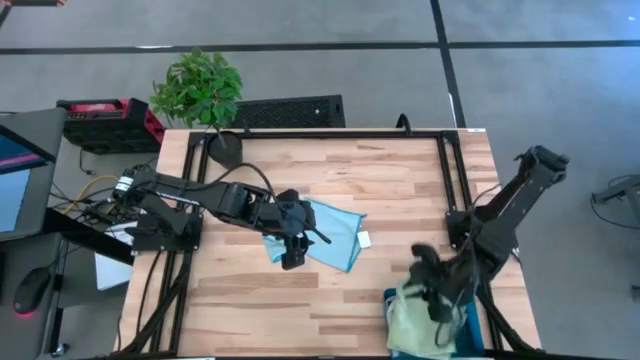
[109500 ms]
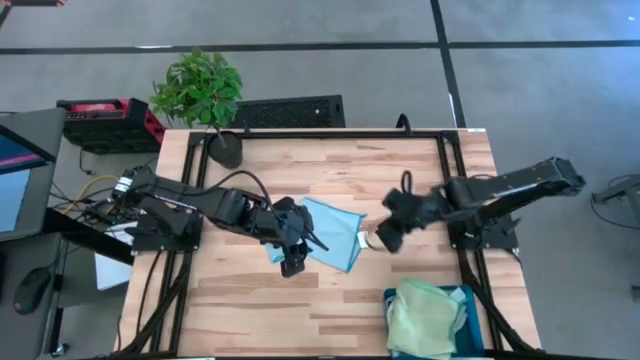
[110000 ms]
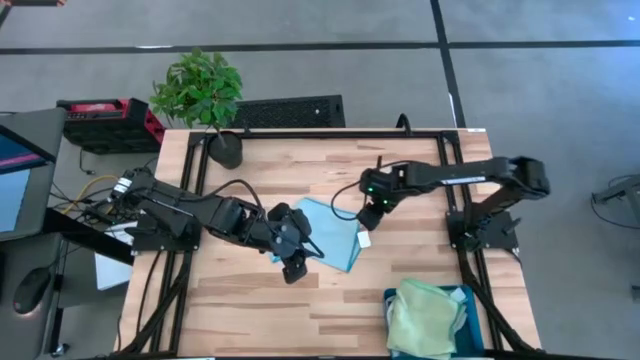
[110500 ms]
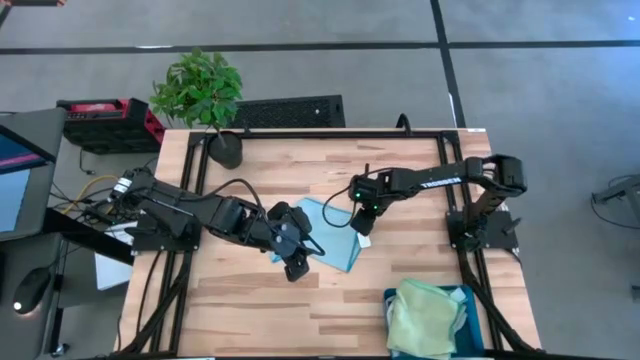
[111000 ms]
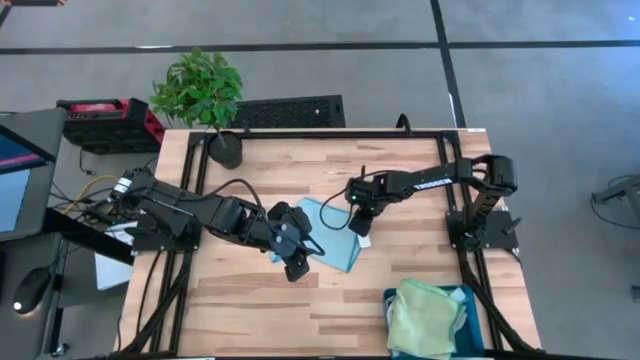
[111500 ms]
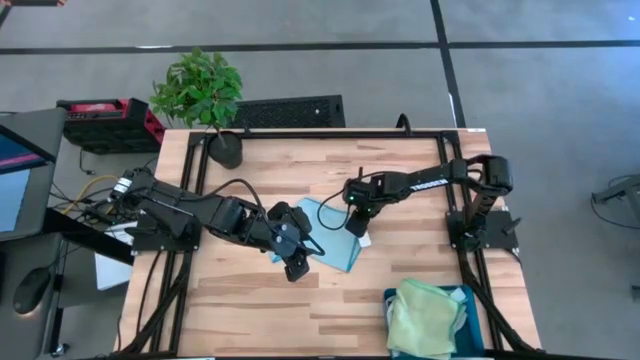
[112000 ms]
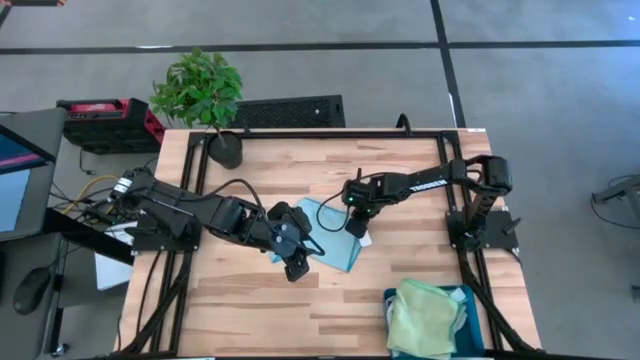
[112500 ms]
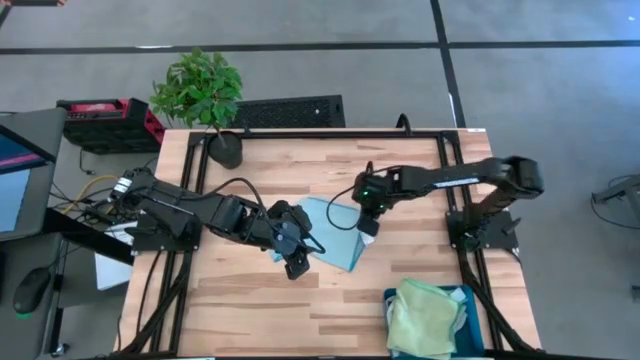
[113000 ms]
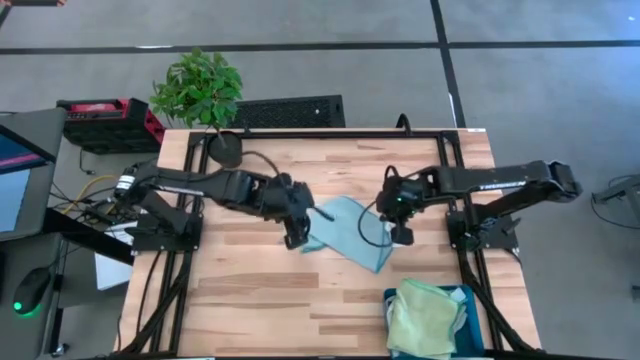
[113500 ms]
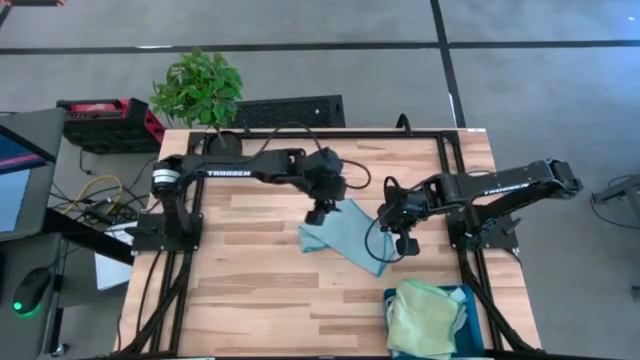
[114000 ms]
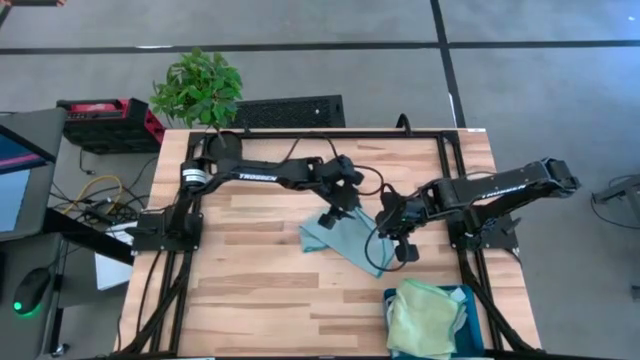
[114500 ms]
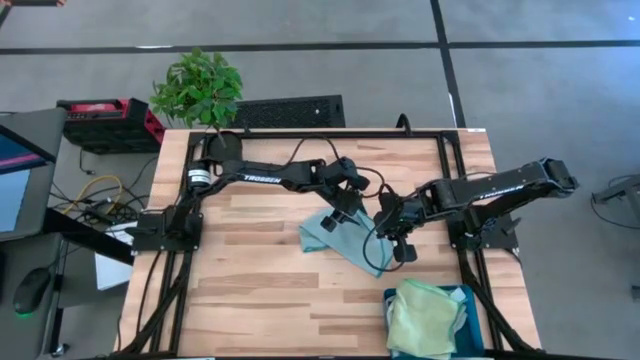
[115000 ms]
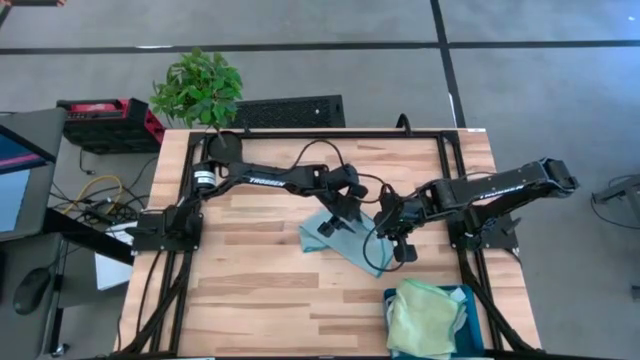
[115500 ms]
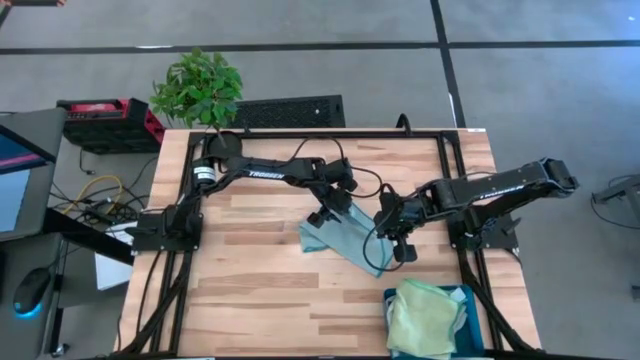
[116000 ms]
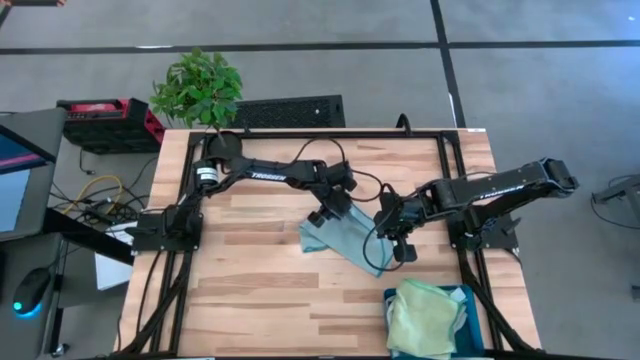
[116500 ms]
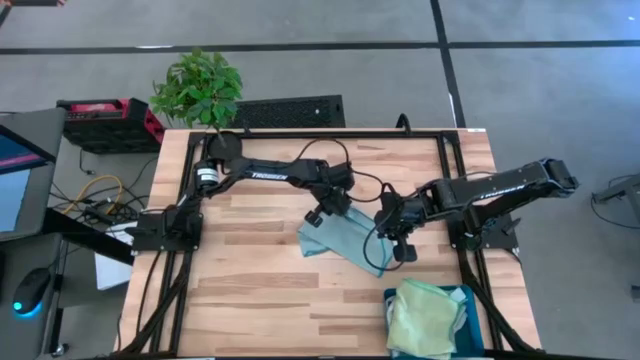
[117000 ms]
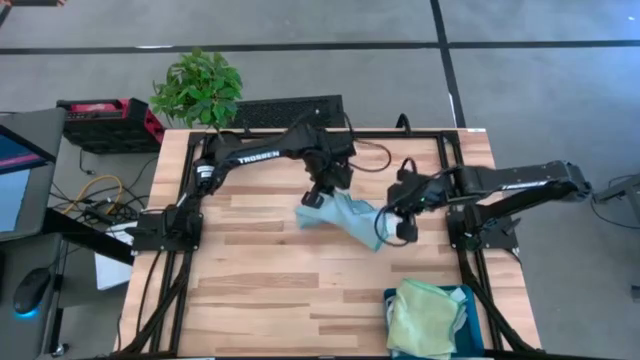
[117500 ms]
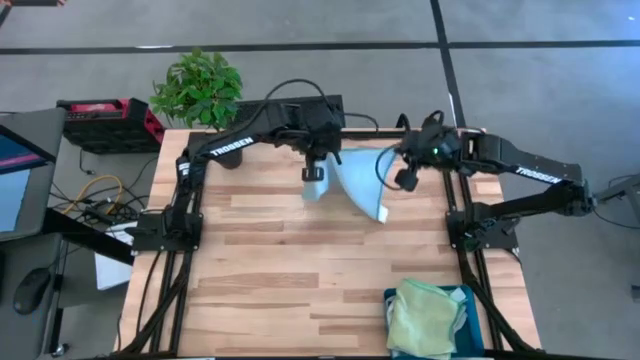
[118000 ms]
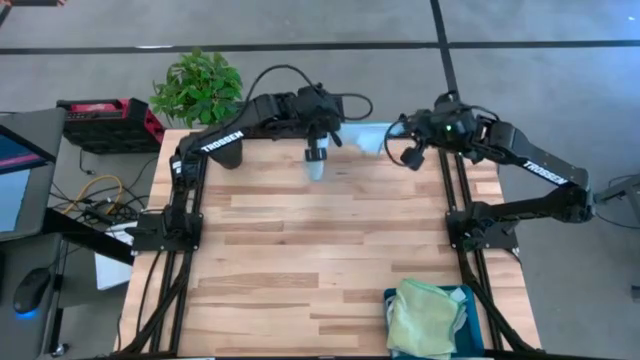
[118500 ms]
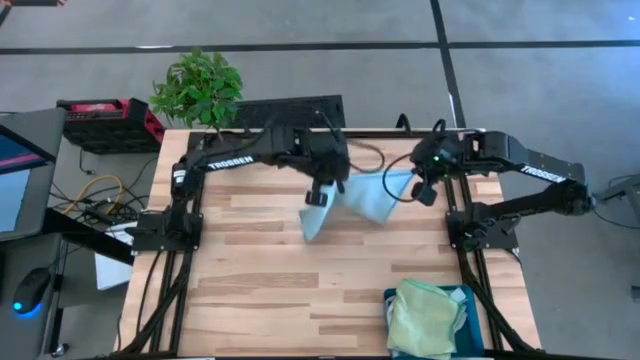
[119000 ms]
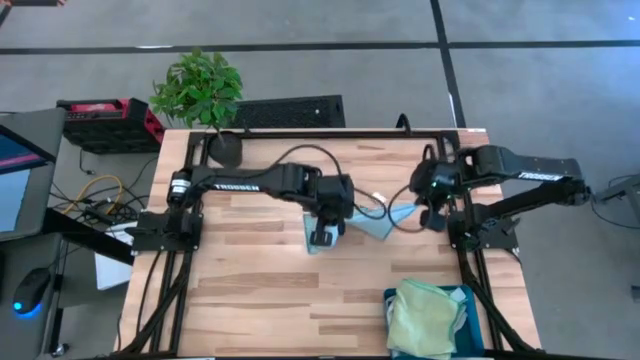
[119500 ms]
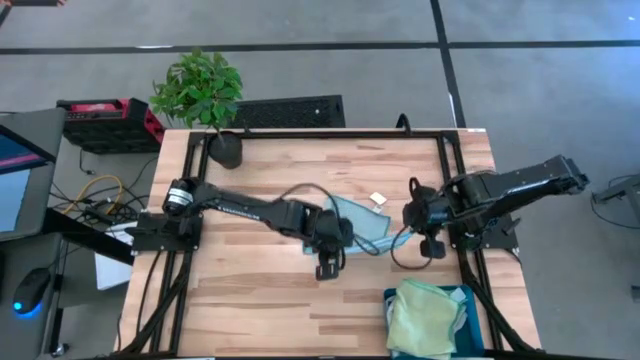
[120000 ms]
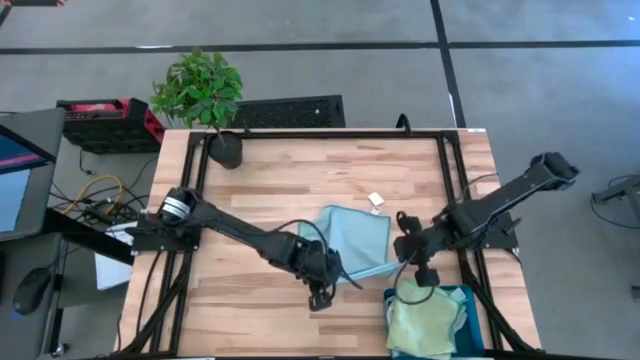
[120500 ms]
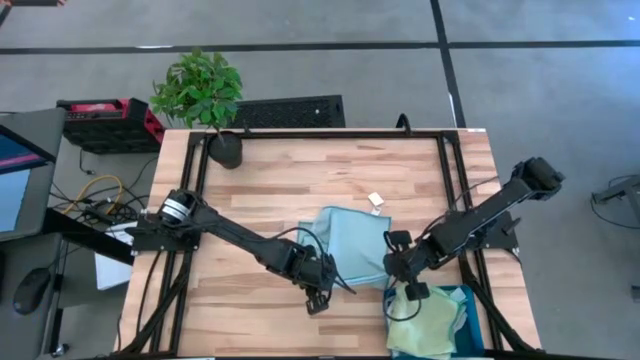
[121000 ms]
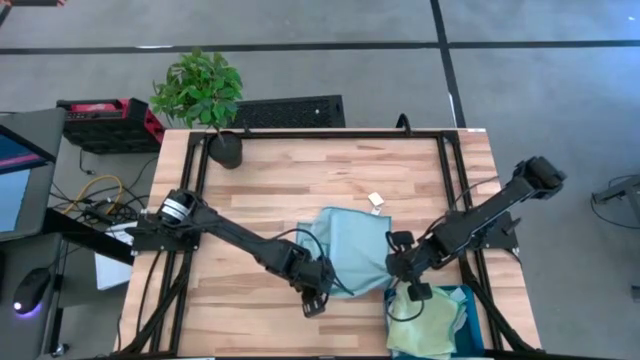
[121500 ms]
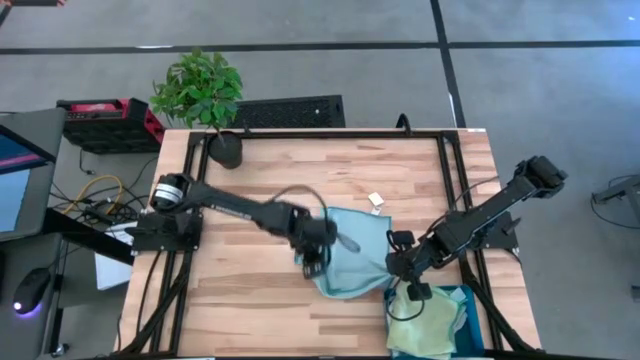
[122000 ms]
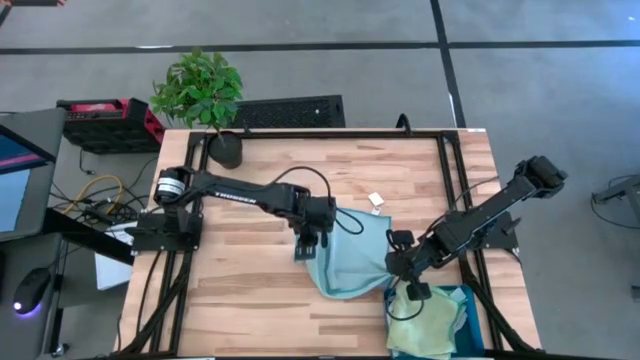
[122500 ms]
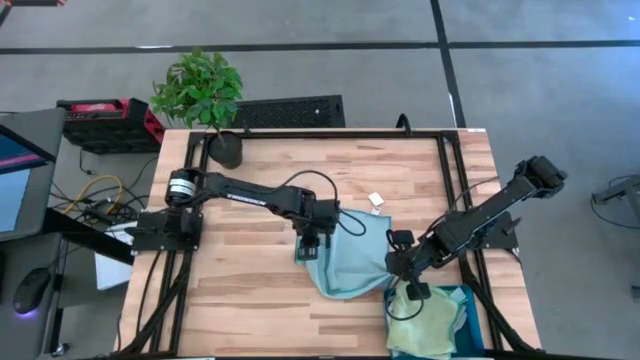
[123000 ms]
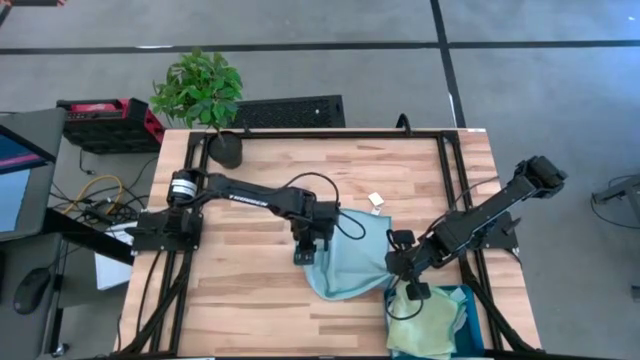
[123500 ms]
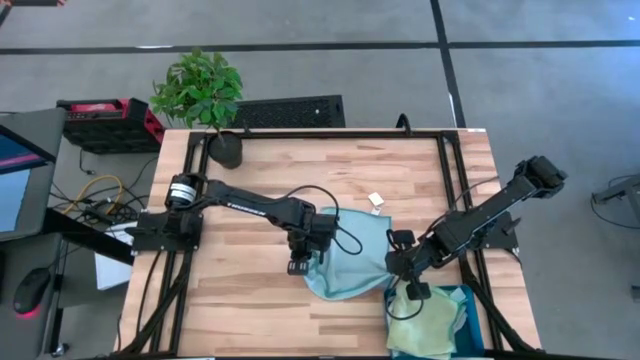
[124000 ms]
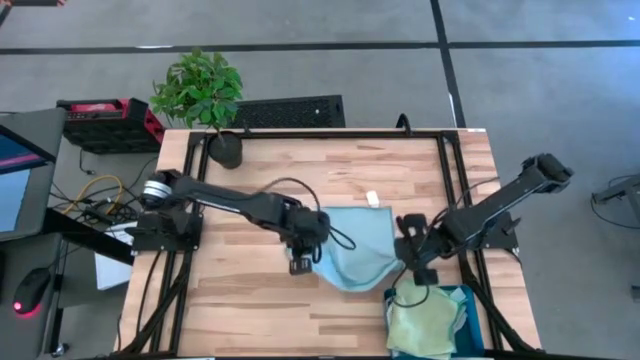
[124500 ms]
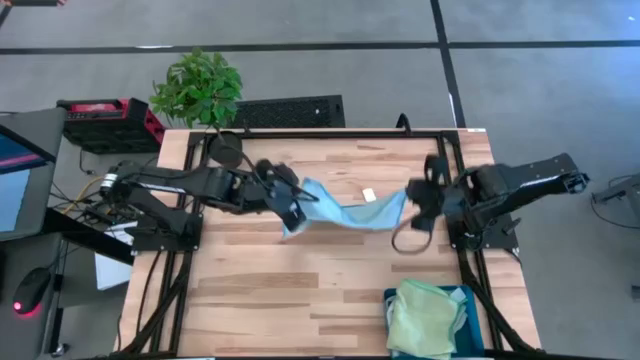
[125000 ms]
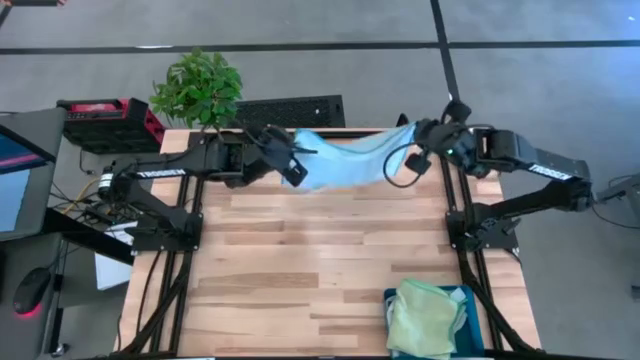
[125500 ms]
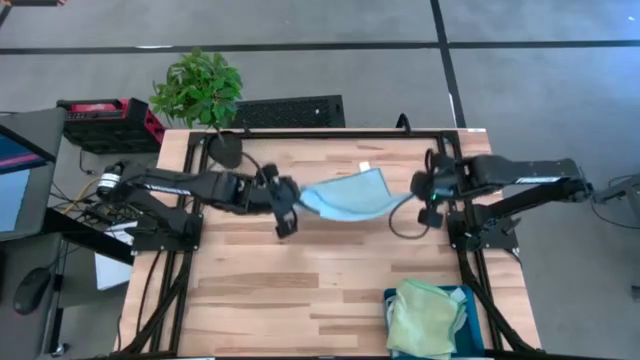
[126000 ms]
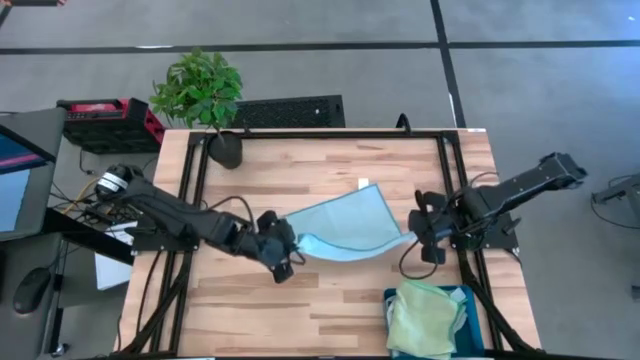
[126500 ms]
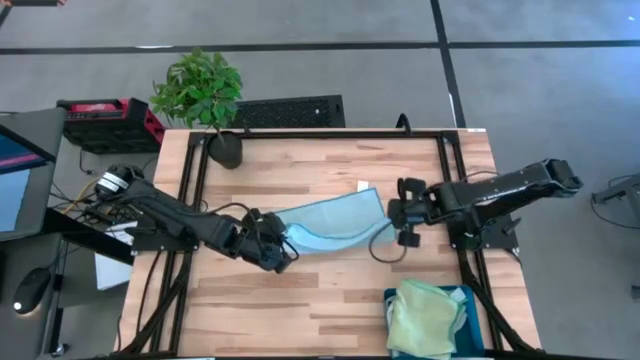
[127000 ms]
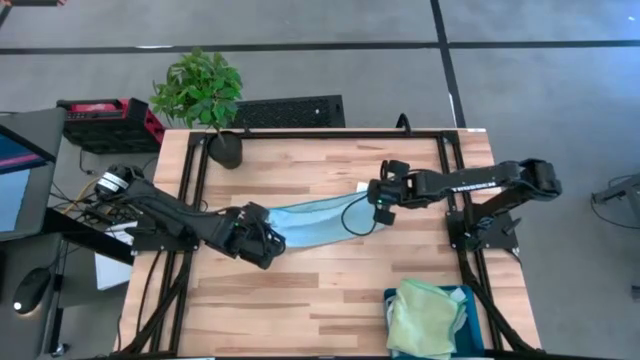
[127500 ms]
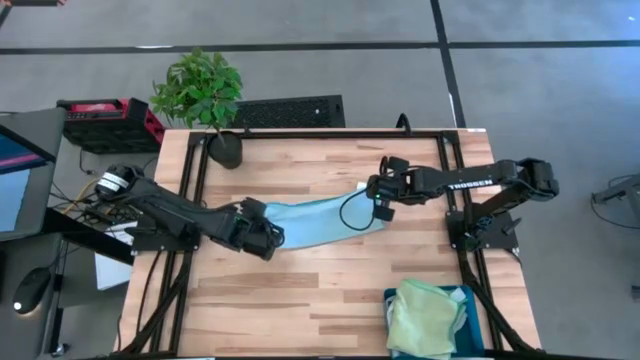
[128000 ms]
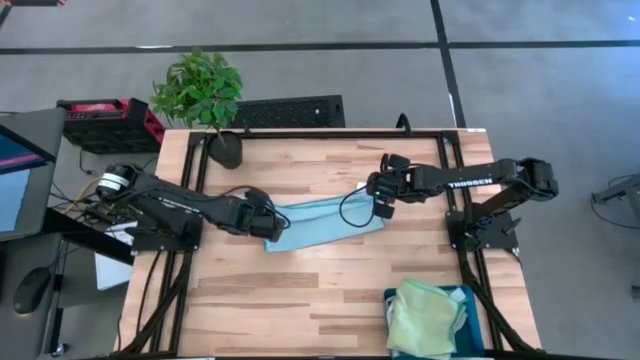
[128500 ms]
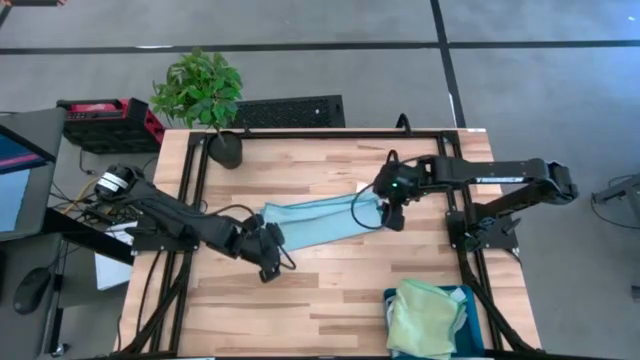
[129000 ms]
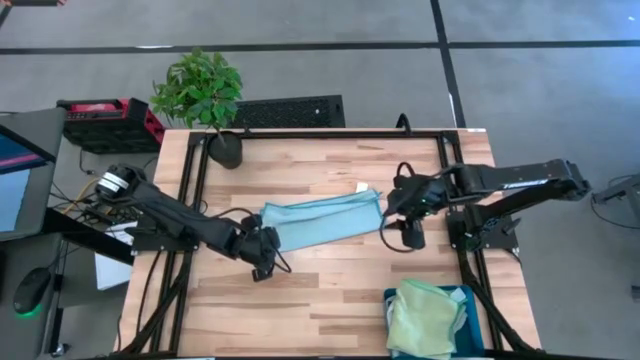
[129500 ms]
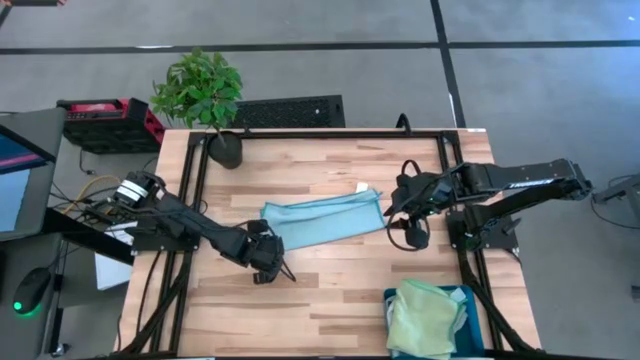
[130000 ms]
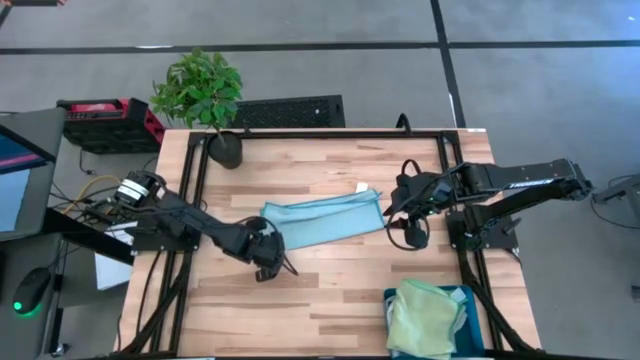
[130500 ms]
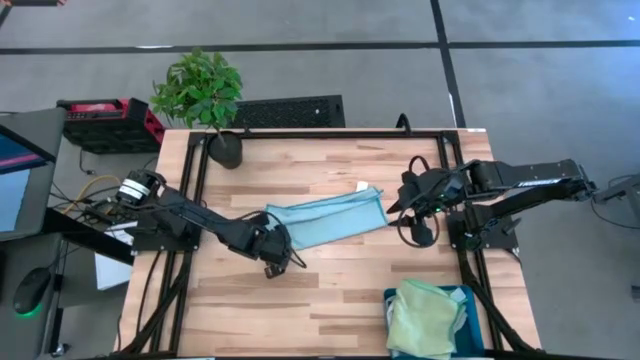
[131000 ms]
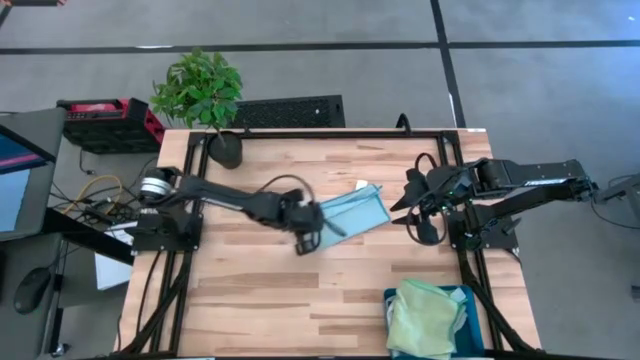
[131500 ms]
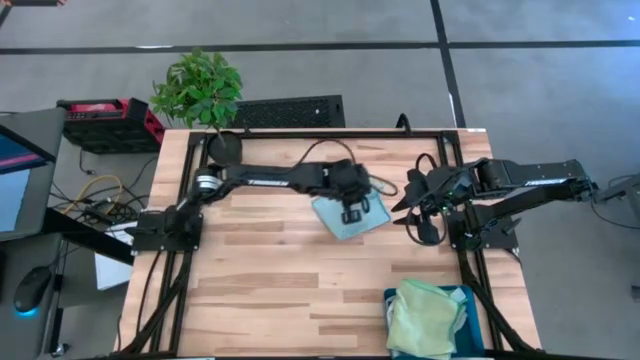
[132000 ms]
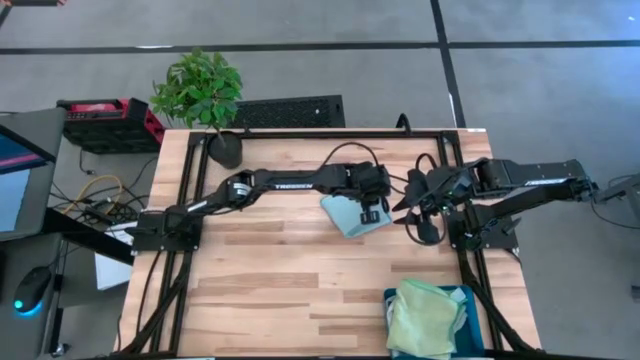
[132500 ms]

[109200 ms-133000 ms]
Task: Fold microfiber towels
Fold the blue microfiber towel
